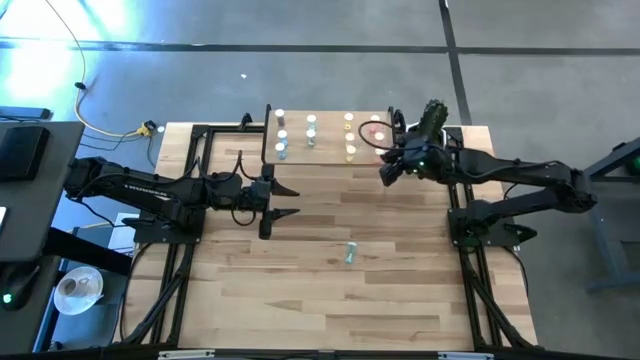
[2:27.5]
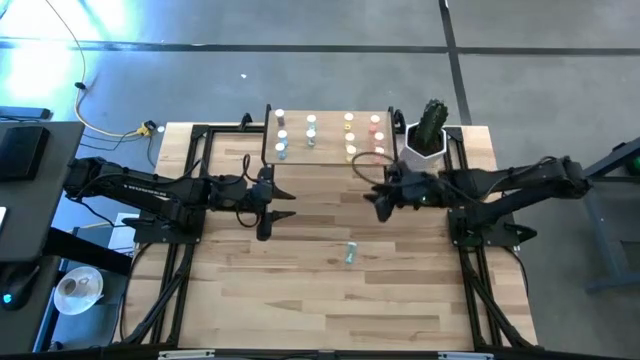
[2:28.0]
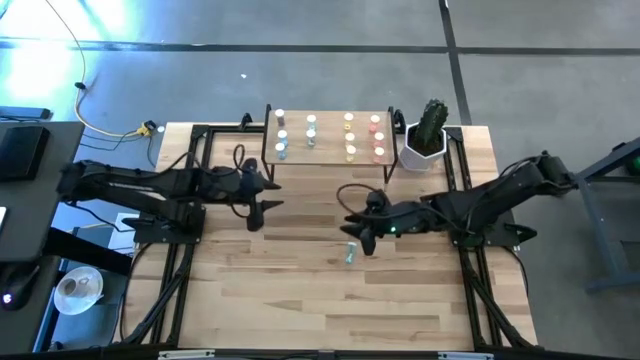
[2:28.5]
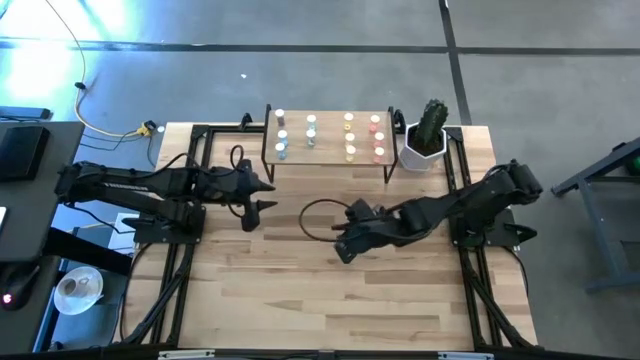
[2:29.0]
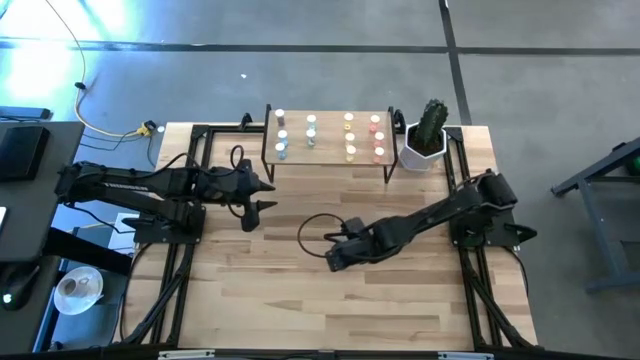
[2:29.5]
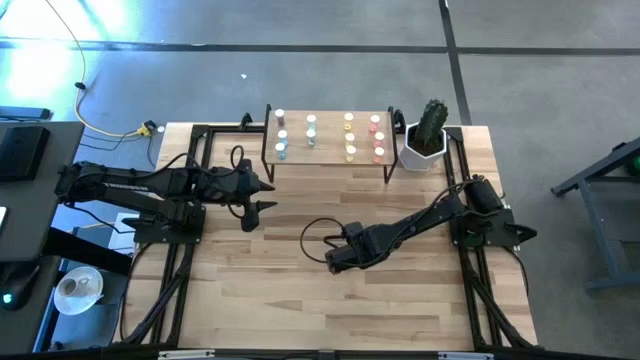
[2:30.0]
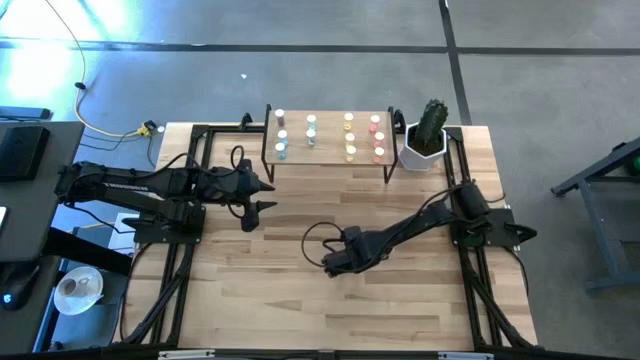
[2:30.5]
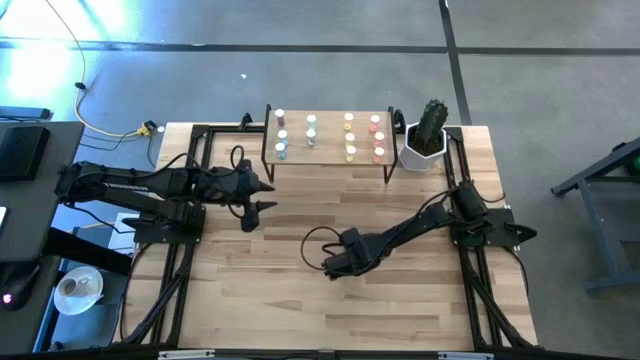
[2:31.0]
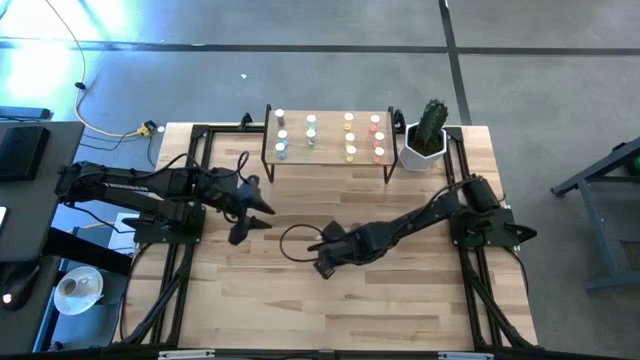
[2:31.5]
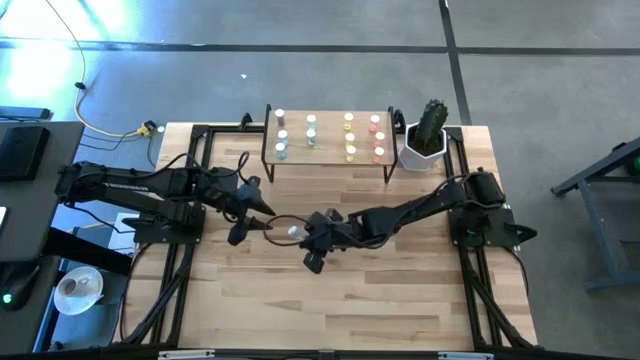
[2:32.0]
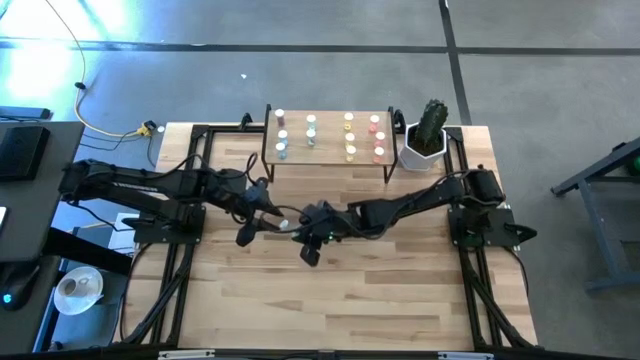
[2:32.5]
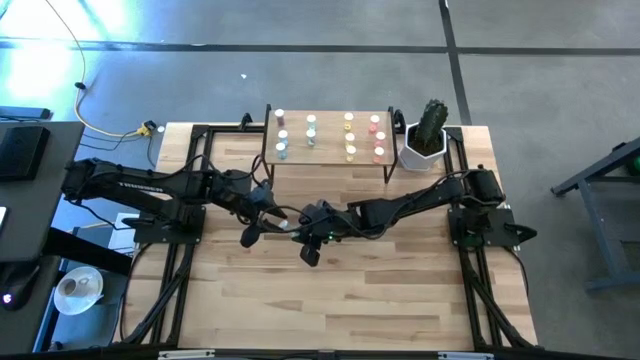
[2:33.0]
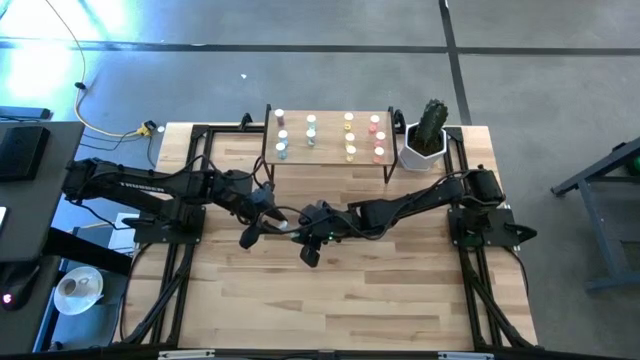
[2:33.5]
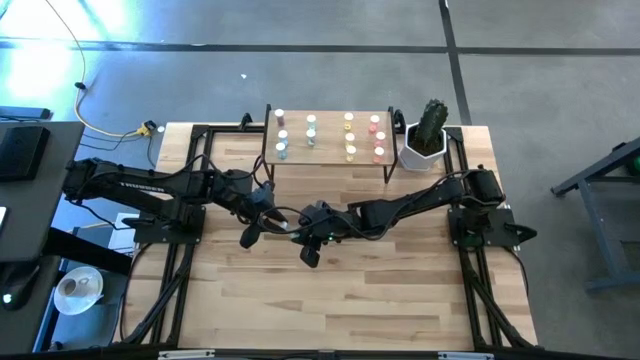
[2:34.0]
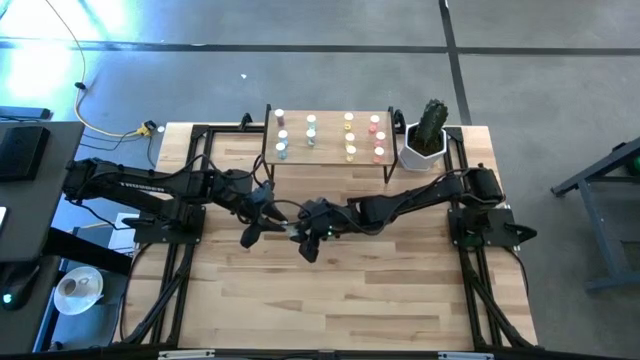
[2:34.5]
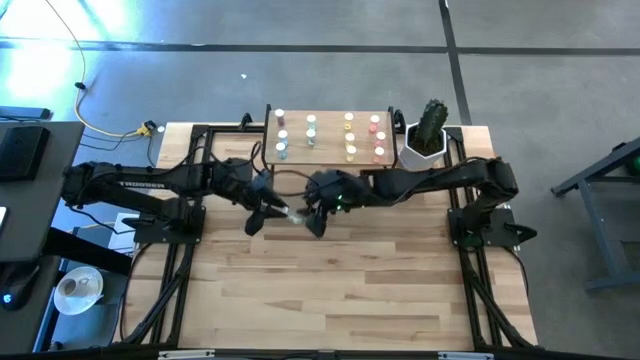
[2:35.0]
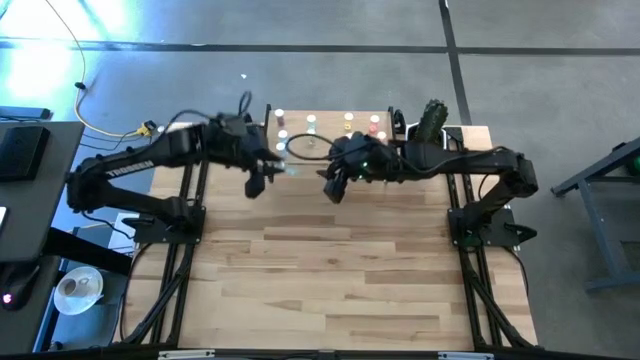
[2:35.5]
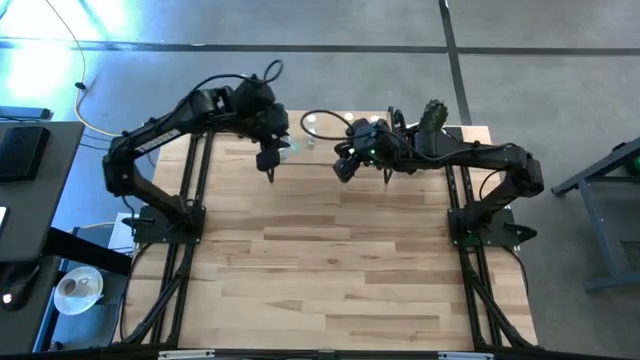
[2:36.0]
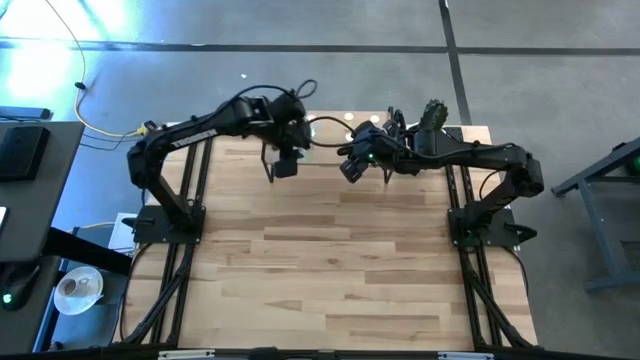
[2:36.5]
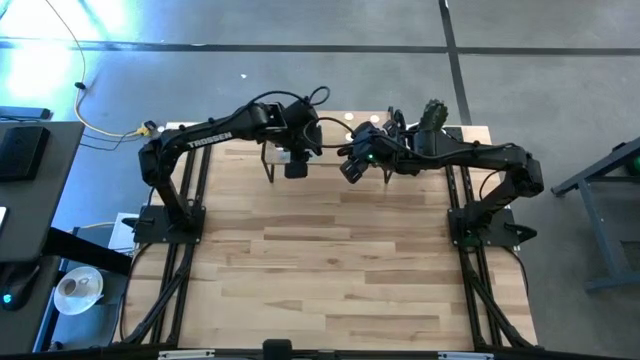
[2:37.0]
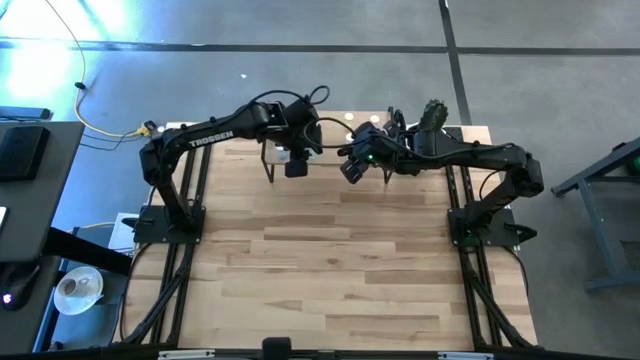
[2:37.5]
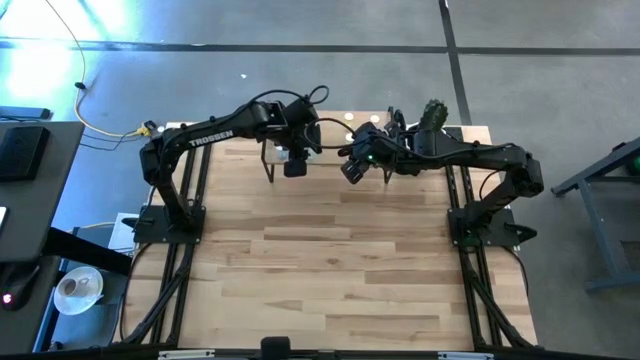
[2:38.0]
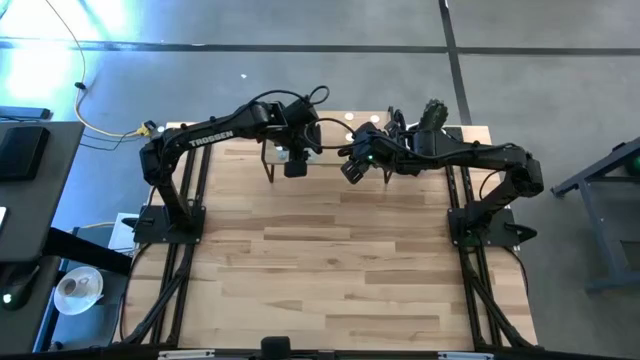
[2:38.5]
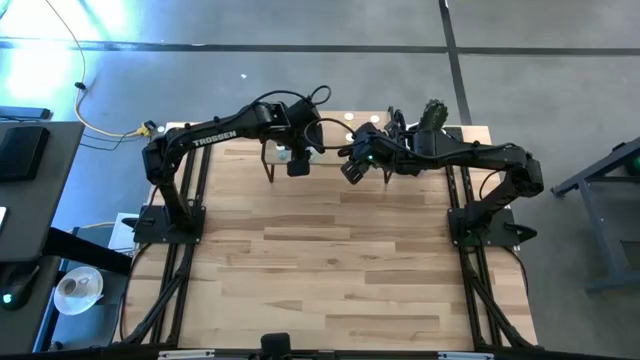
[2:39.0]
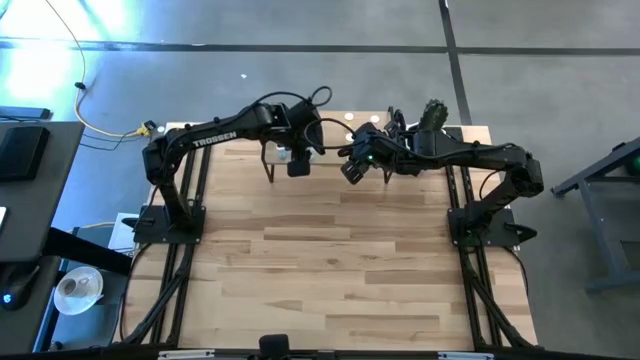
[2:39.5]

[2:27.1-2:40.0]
Task: Pick and place medicine bottles onto shelf by color
Put the blue pill bottle on the shelf aligned with the other blue pill bottles

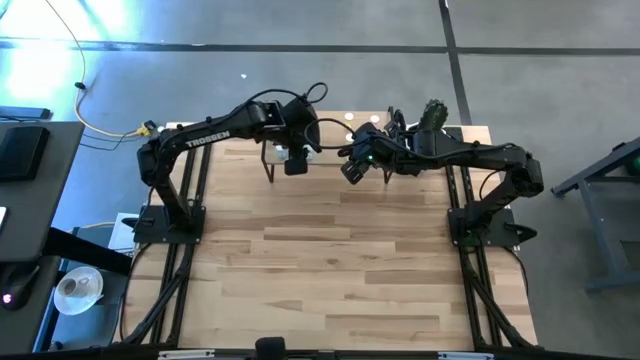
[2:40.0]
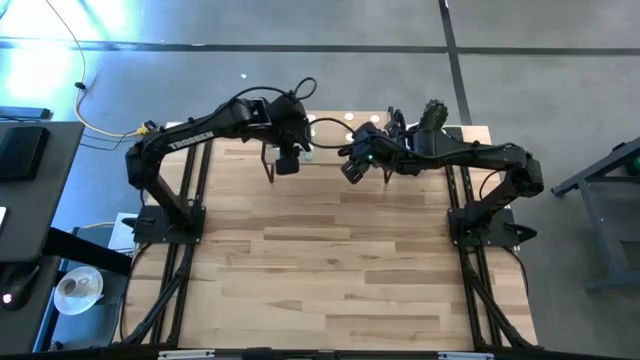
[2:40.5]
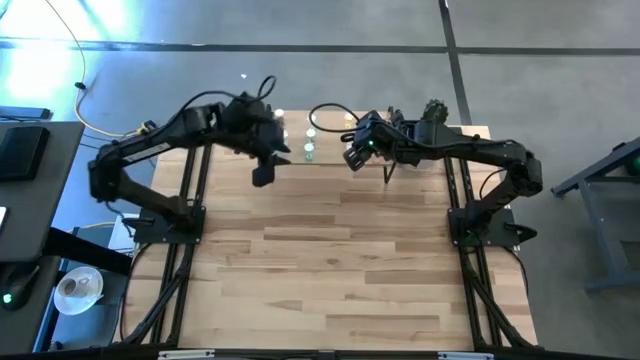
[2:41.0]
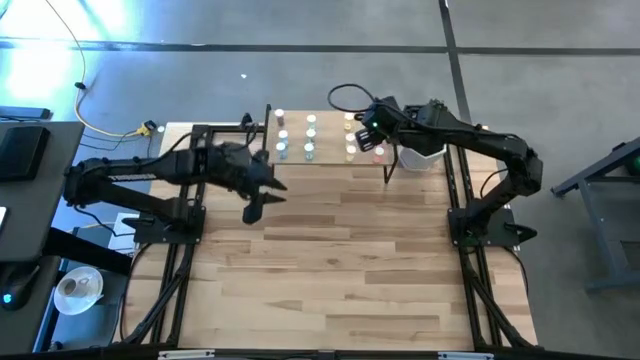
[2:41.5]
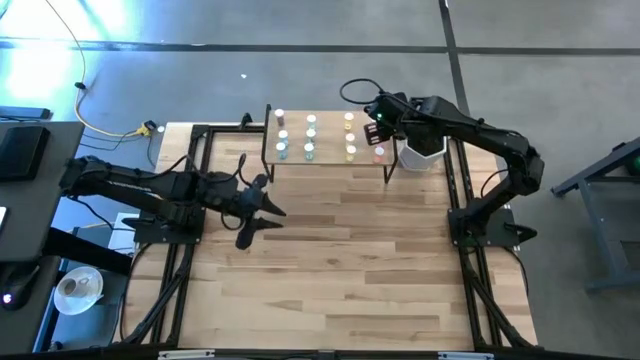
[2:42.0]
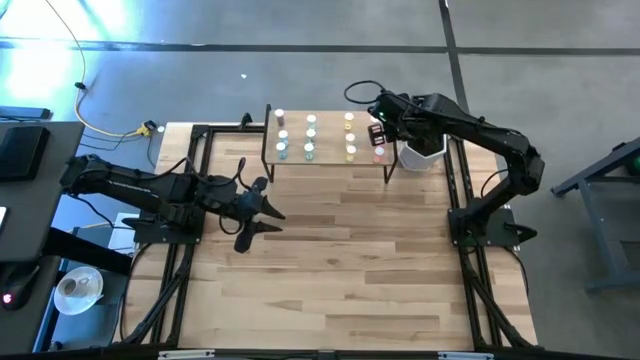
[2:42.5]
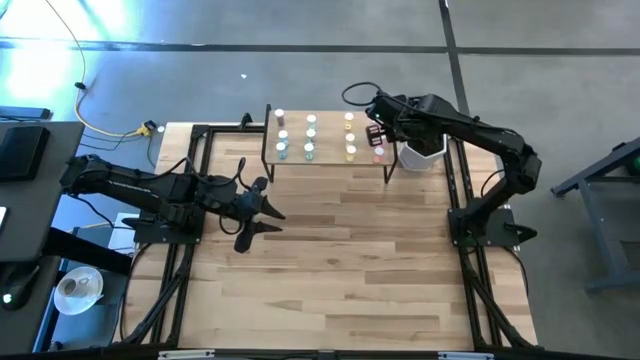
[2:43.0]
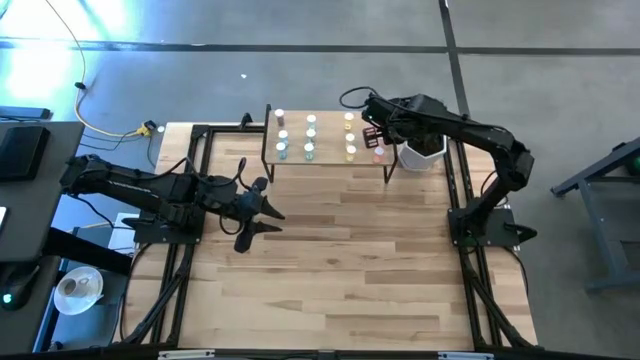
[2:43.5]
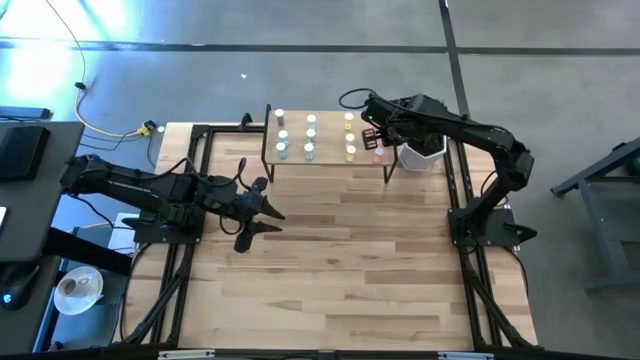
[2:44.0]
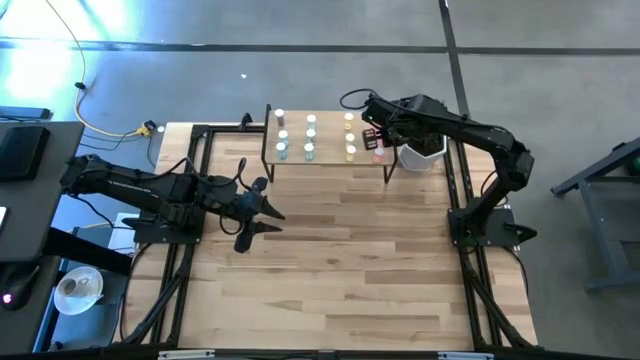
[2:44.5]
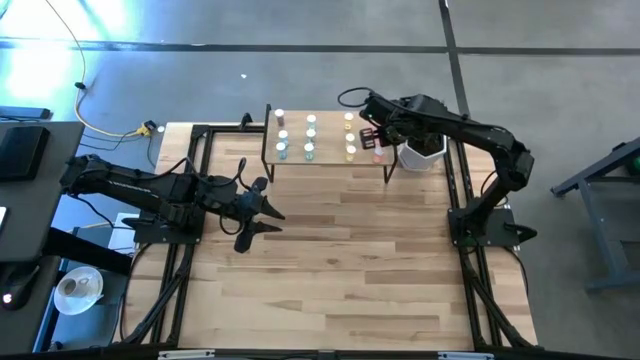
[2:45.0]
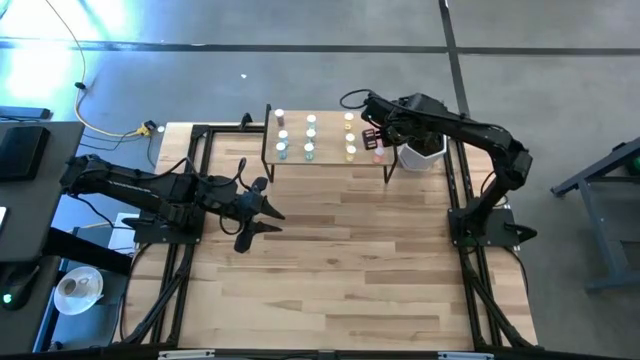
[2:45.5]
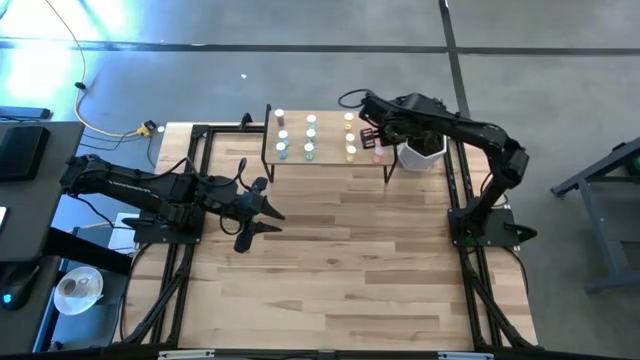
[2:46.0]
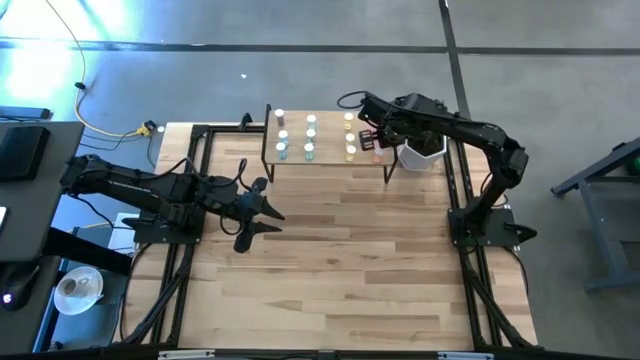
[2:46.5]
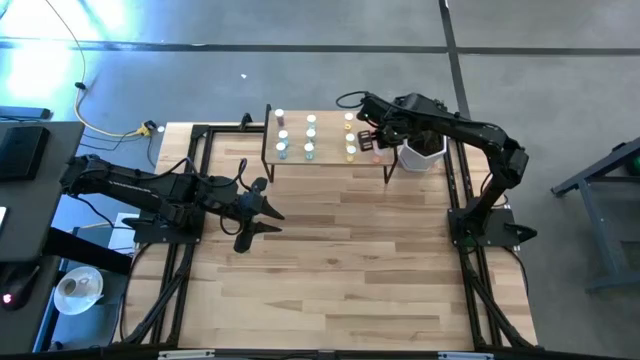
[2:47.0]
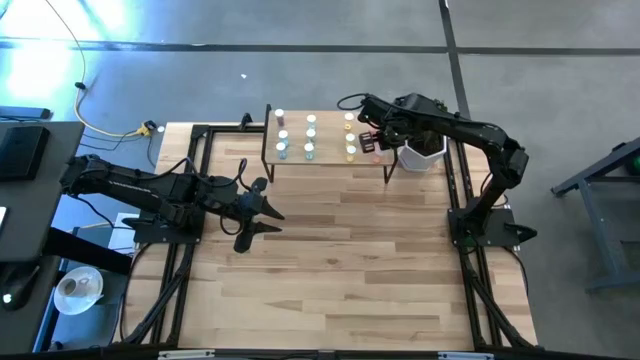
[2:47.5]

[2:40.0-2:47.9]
Adjust the pink pill bottle on the shelf

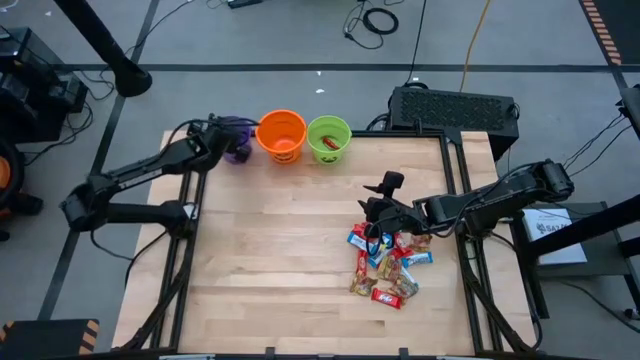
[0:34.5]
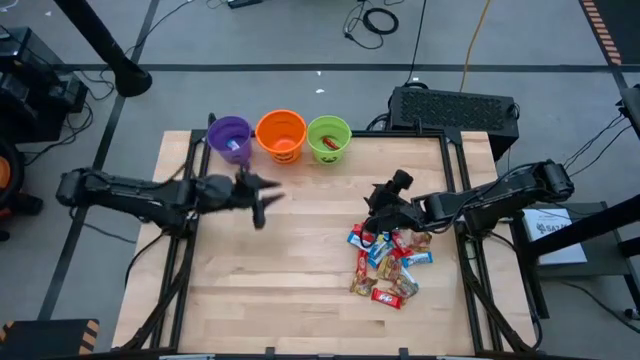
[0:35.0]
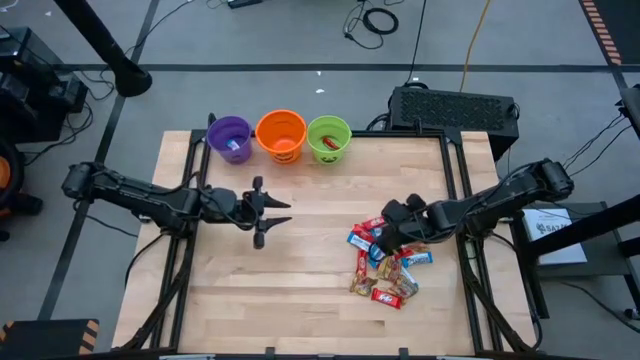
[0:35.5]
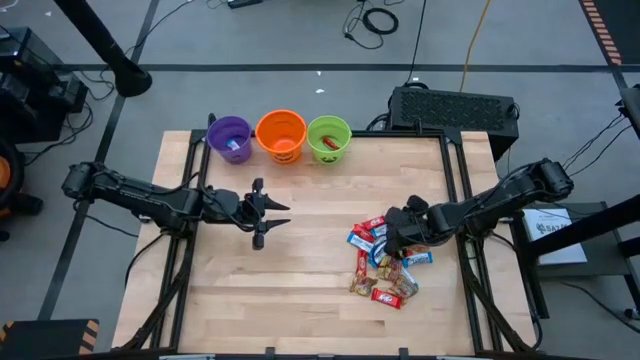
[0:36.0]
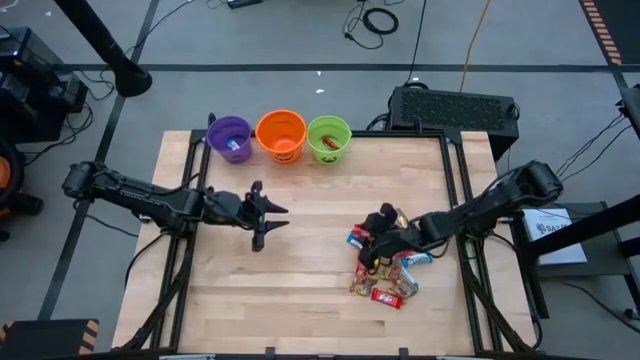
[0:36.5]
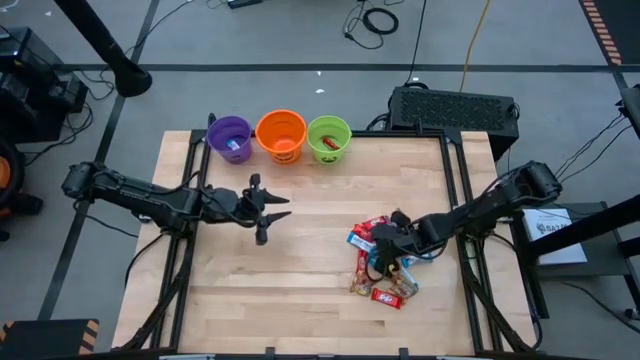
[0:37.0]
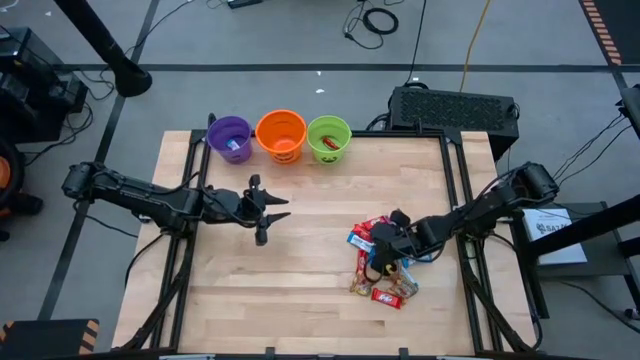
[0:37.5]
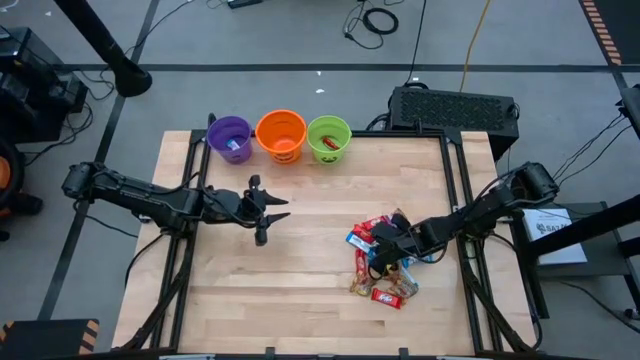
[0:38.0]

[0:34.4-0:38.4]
Task: Sort candy by brand, put in halloween buckets
Put the white chocolate bar into the violet bucket
